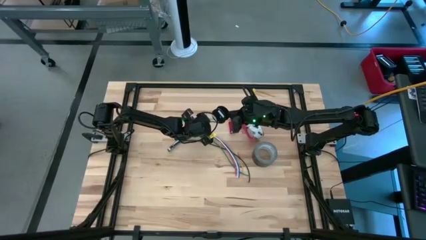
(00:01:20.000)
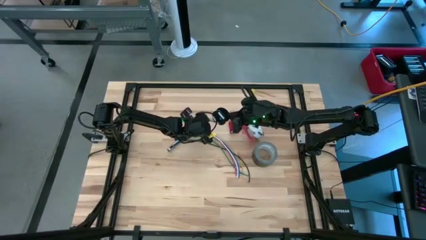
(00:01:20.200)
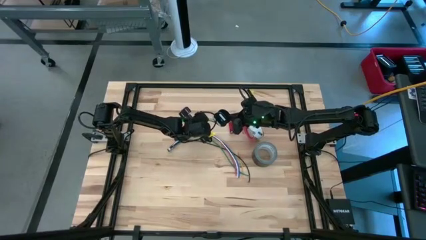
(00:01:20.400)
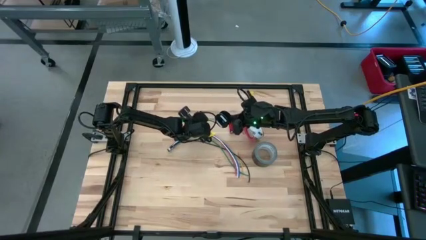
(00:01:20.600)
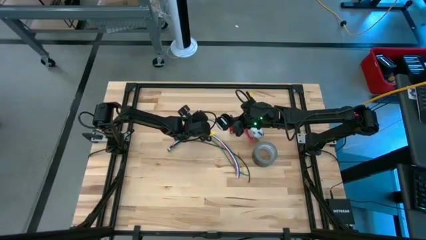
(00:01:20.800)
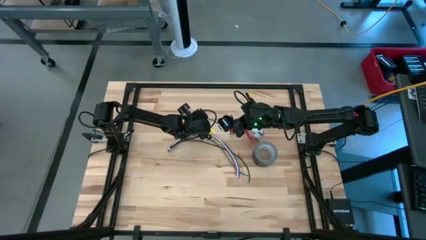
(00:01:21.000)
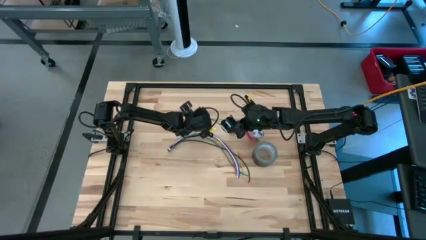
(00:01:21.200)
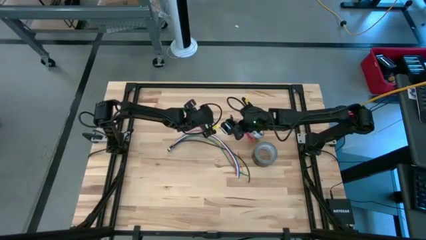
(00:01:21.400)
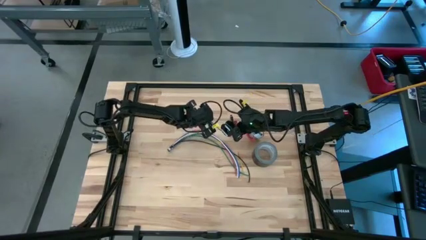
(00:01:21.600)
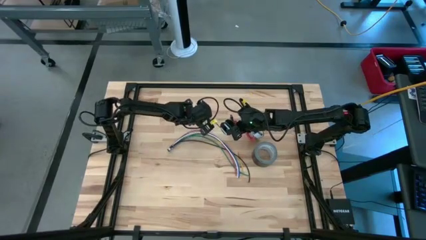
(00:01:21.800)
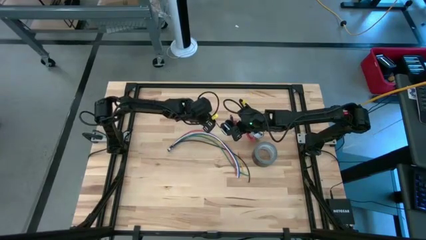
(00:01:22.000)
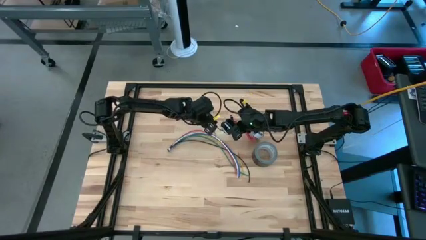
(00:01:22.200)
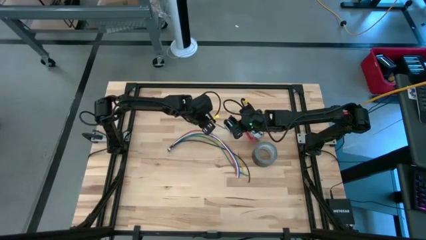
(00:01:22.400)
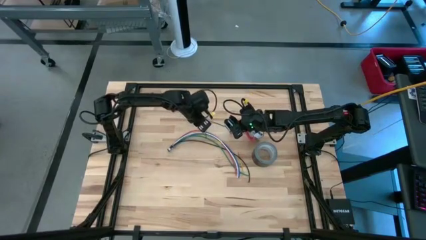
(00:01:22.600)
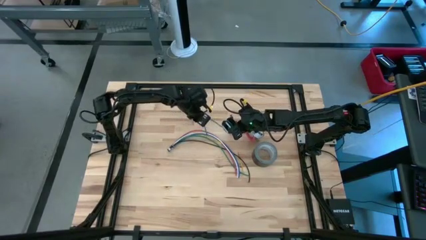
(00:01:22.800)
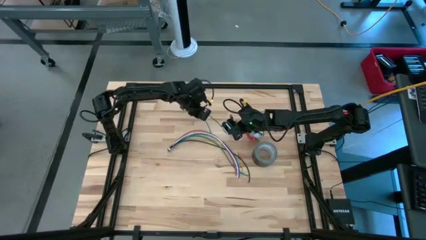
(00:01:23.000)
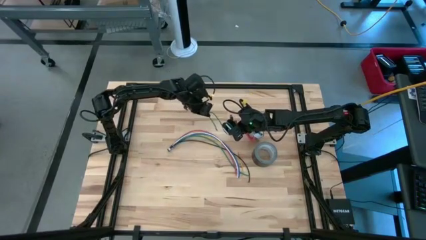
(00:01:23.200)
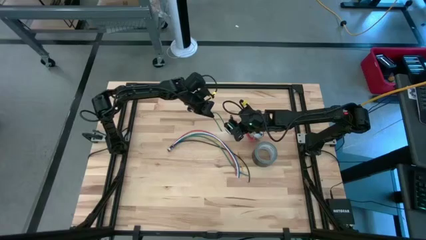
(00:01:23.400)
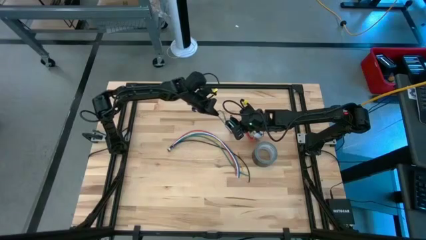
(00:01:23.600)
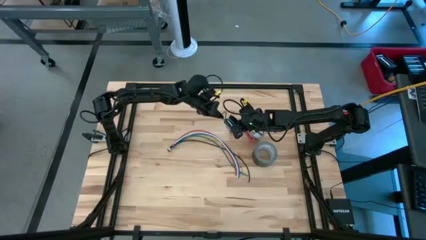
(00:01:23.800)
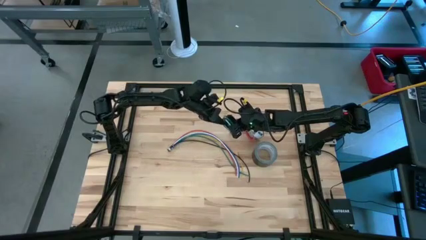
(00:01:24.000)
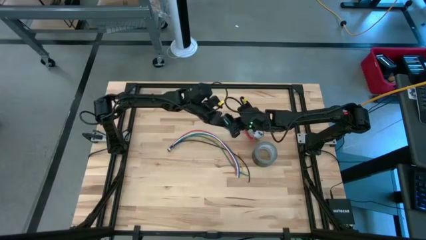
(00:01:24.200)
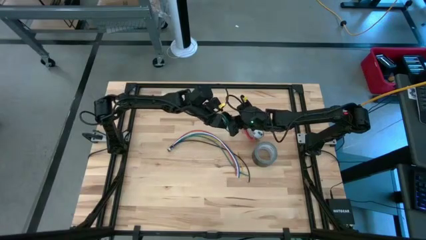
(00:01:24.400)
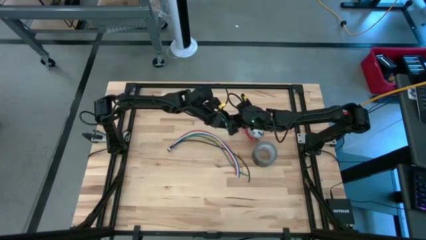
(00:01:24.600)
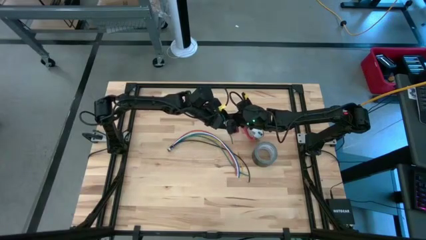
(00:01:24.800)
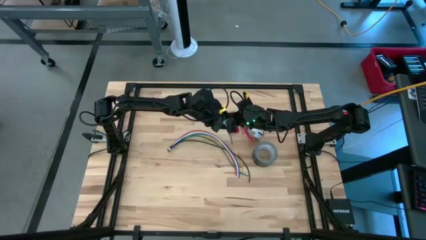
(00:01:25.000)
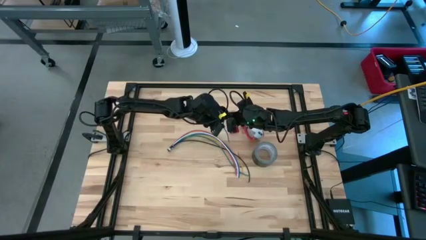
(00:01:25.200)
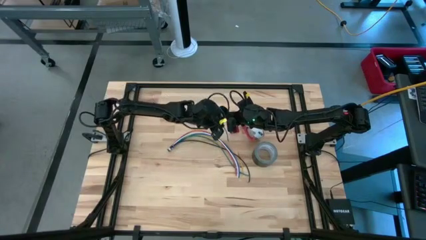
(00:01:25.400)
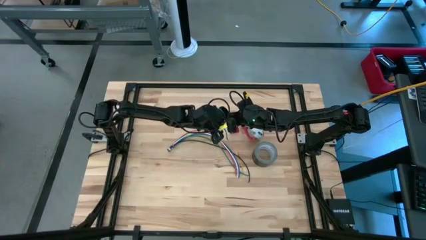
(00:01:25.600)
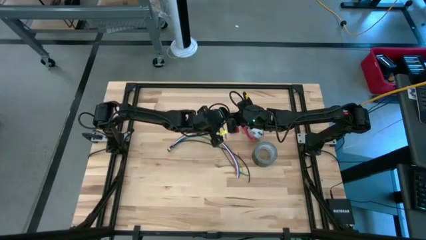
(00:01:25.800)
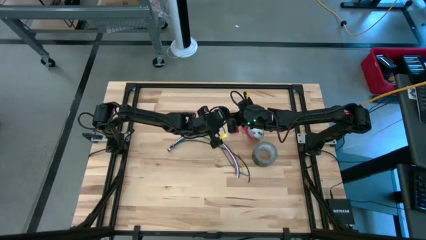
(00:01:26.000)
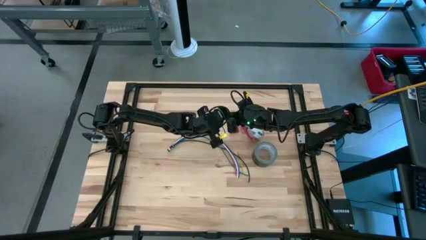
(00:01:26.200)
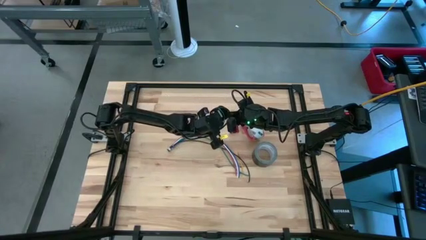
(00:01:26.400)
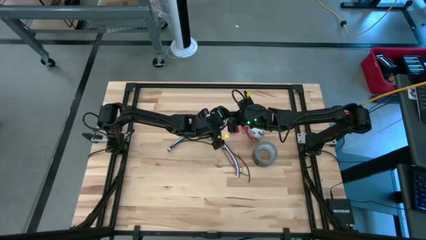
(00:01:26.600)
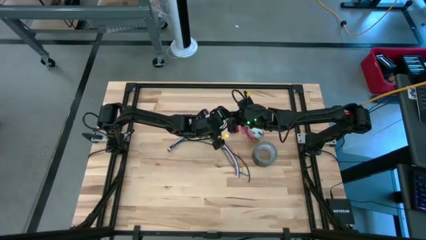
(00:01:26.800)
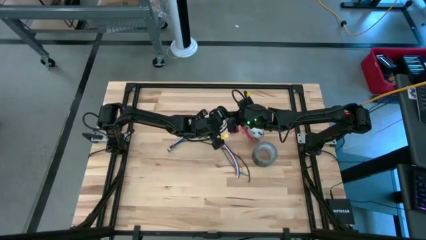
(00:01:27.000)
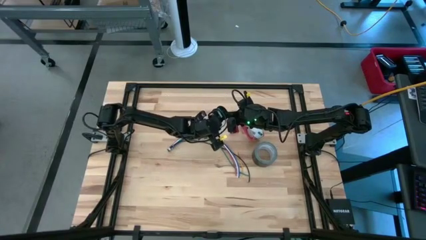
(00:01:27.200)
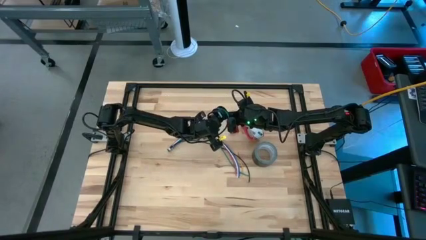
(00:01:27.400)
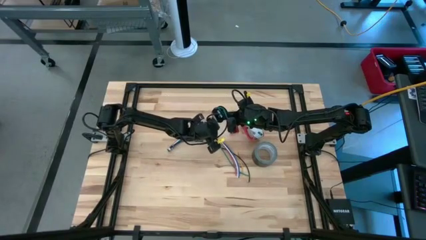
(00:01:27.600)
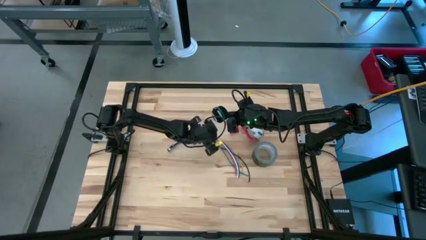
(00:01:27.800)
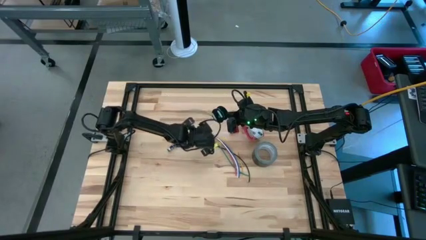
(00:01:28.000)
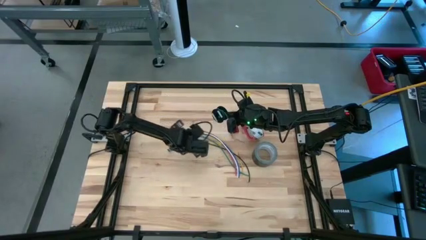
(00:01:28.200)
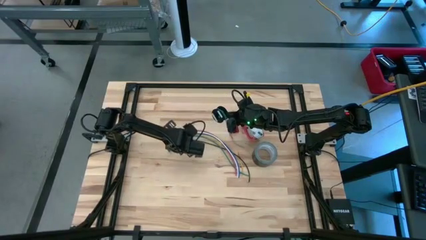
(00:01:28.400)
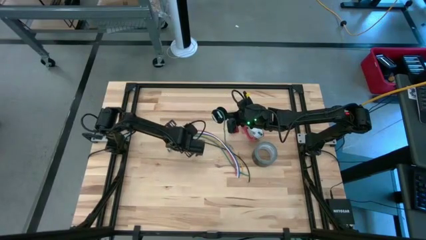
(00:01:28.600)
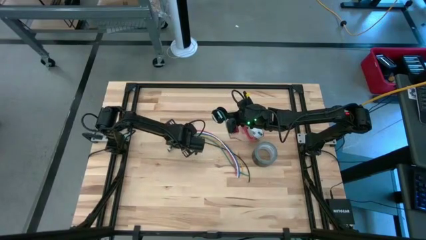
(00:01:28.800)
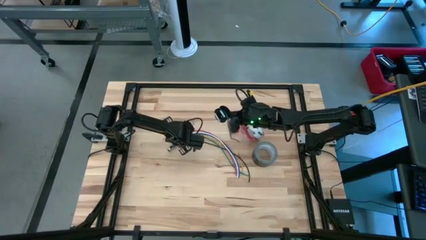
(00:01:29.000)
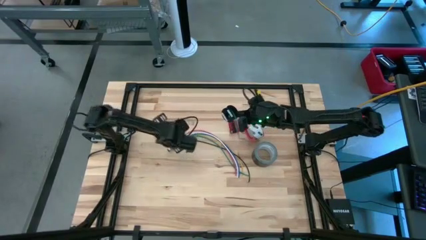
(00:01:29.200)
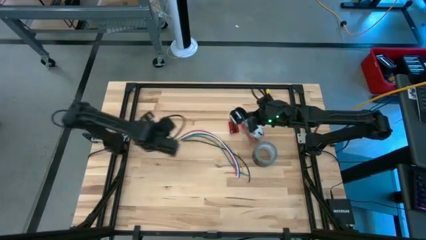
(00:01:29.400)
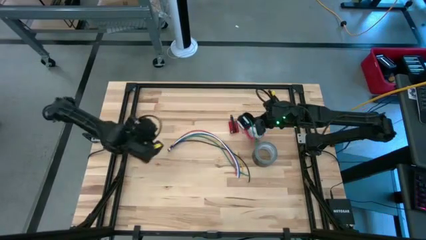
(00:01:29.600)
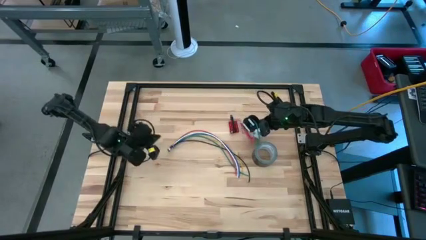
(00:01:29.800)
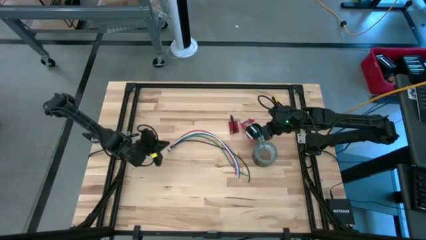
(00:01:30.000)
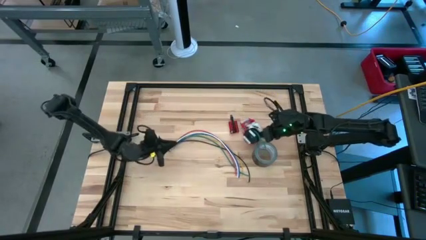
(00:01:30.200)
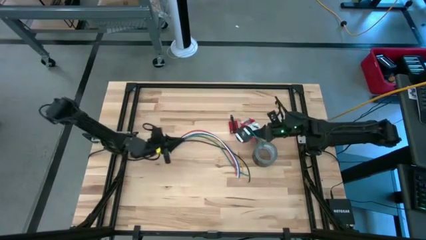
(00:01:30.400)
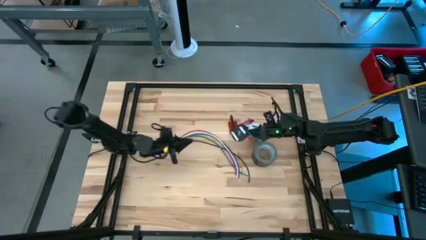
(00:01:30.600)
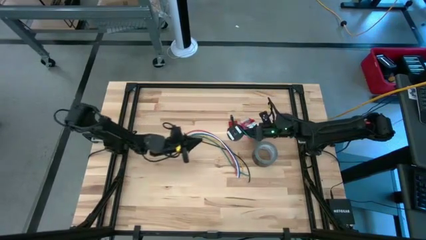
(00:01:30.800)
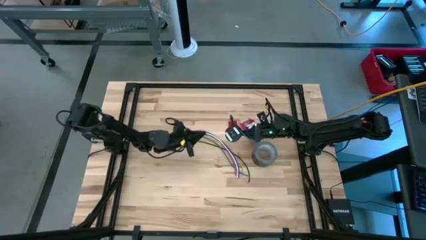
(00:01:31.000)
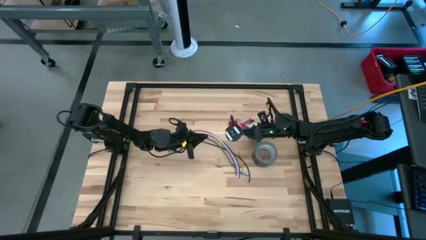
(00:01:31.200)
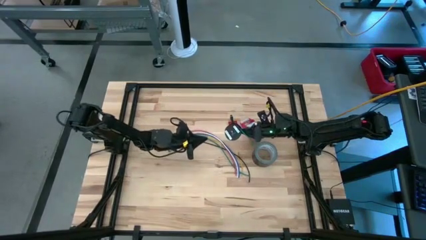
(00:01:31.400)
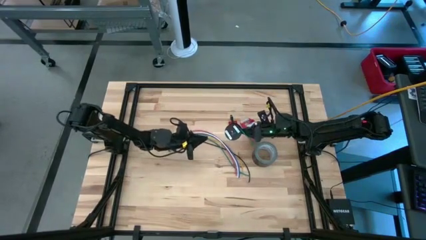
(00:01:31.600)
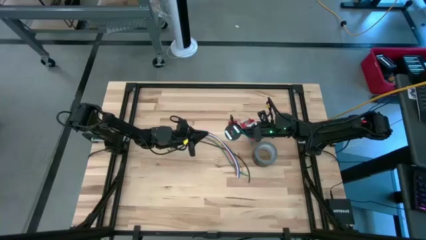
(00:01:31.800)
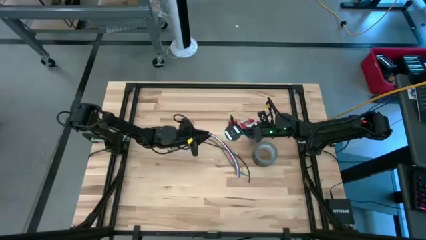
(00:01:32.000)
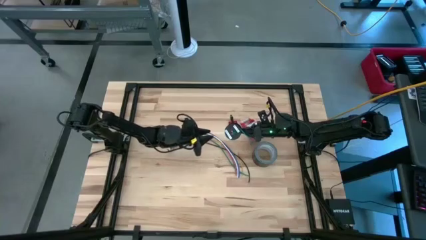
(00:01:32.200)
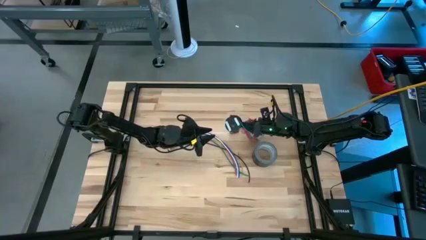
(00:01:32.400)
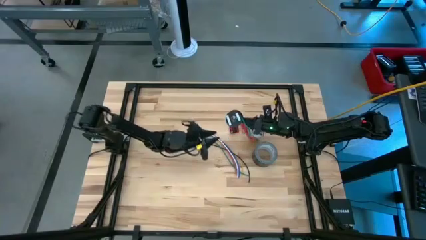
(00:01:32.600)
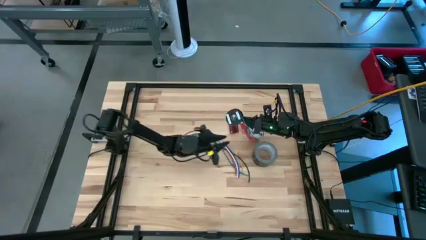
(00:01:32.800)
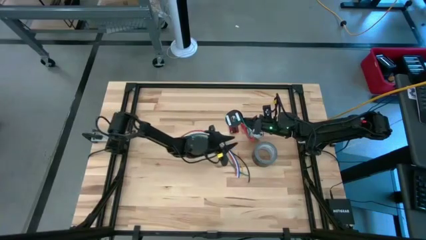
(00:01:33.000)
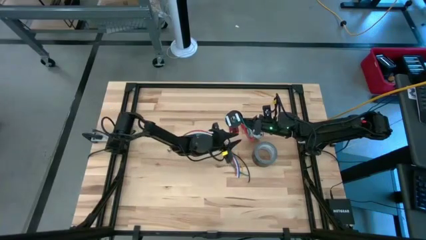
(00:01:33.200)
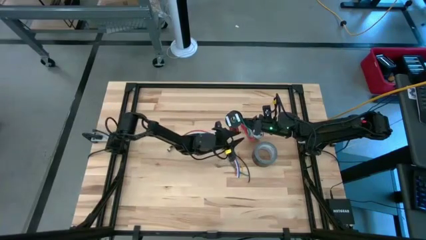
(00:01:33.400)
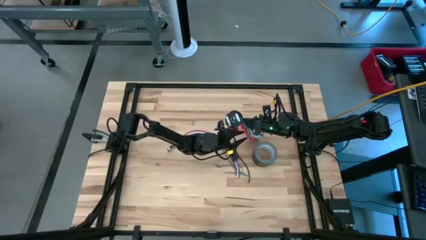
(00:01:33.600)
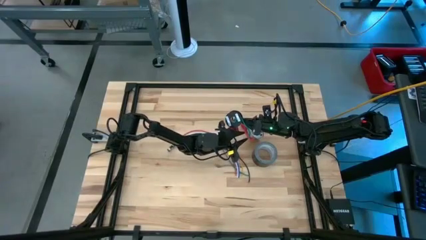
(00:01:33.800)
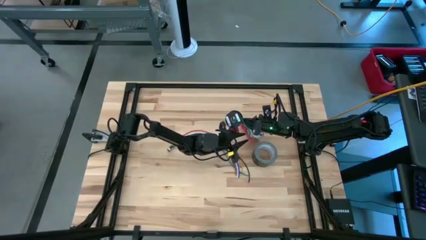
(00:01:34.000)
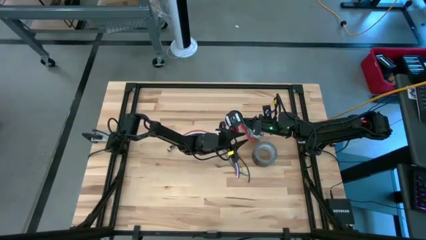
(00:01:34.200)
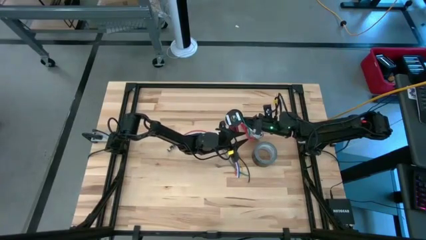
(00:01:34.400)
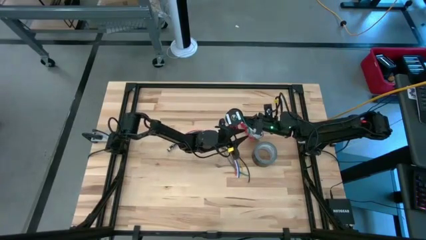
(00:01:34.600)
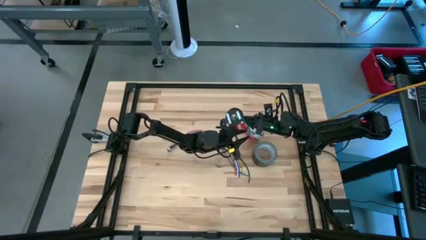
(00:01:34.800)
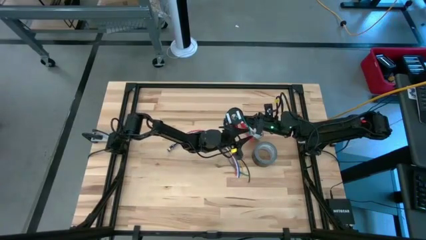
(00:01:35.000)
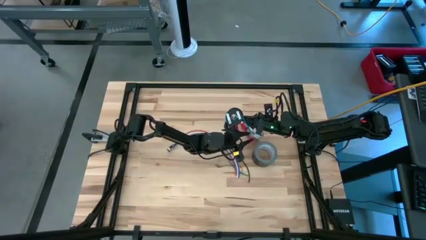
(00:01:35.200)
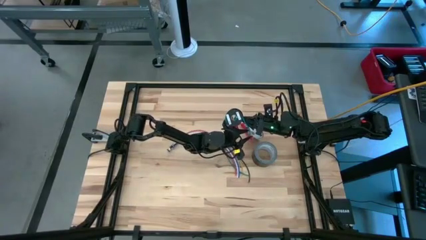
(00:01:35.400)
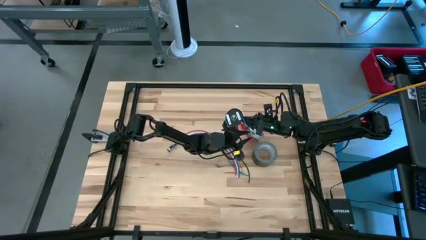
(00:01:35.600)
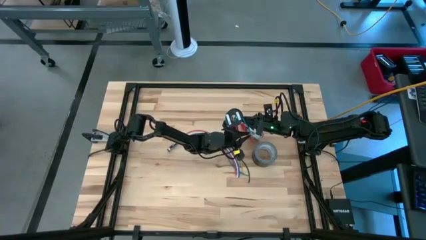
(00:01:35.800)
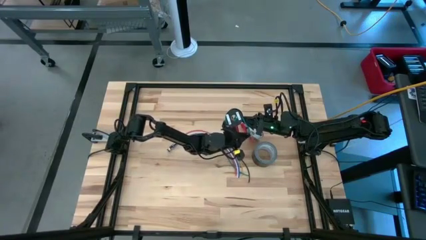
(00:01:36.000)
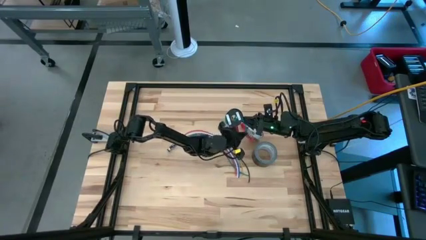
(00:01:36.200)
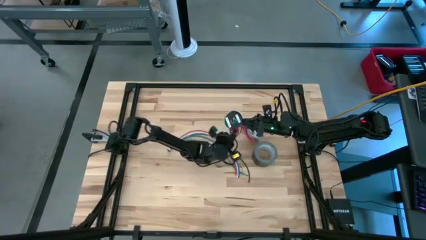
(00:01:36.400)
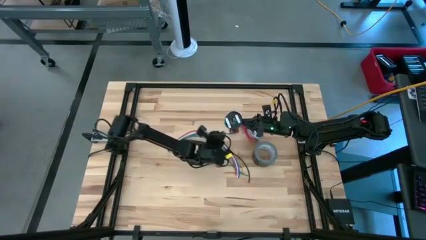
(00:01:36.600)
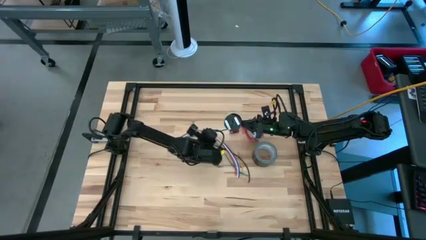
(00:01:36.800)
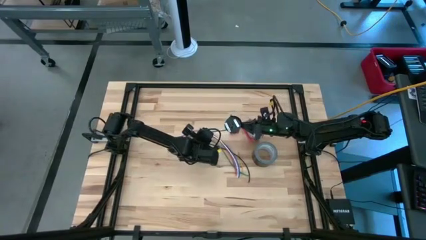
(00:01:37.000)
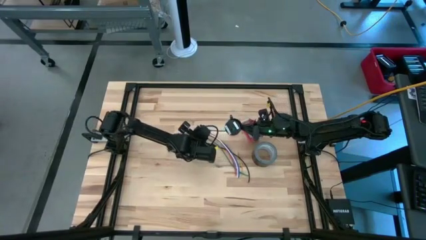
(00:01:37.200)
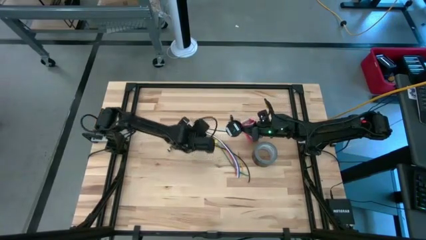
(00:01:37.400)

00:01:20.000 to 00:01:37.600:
Task: Coil cords
Coil green wire onto the spool
